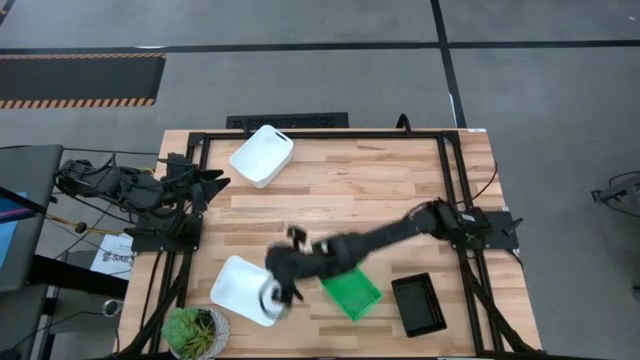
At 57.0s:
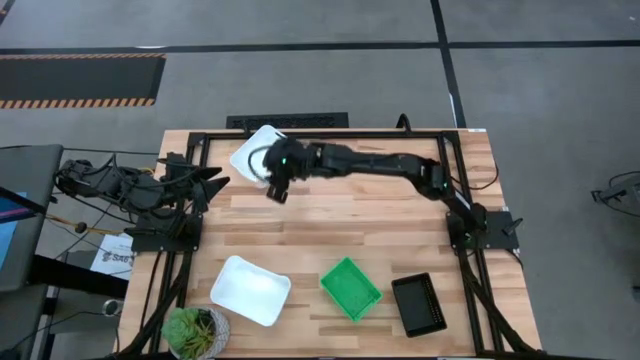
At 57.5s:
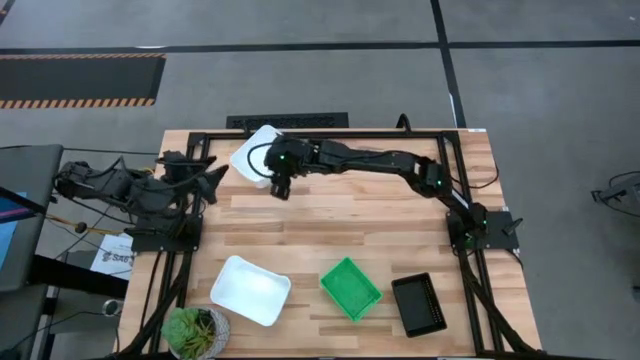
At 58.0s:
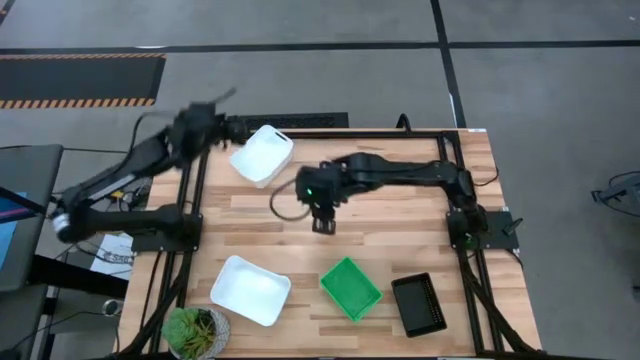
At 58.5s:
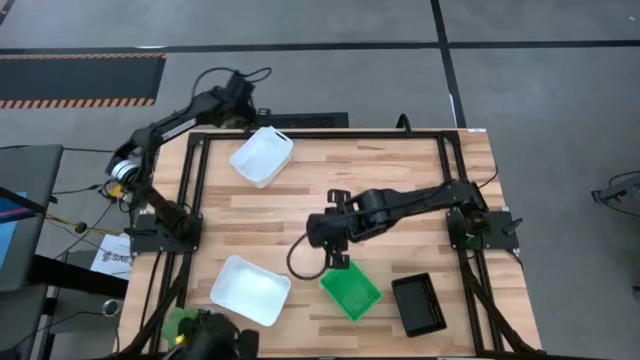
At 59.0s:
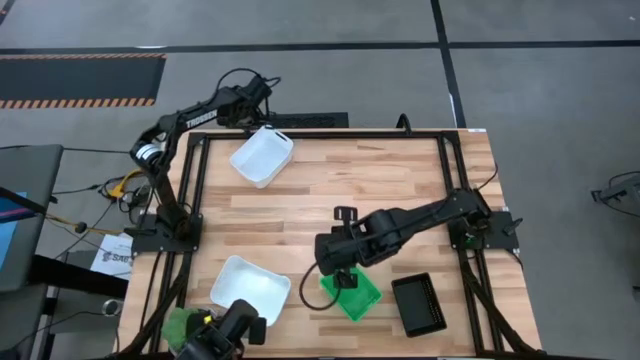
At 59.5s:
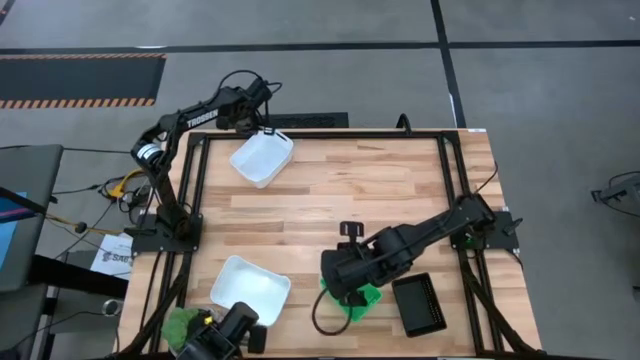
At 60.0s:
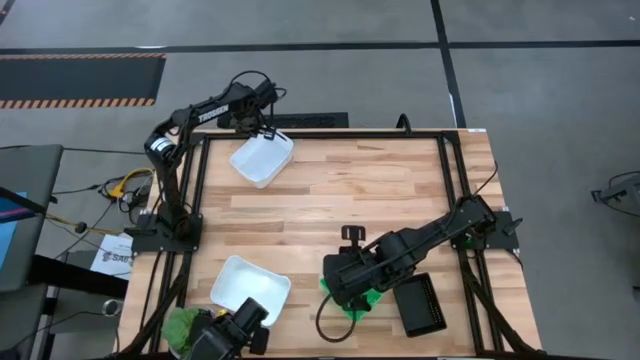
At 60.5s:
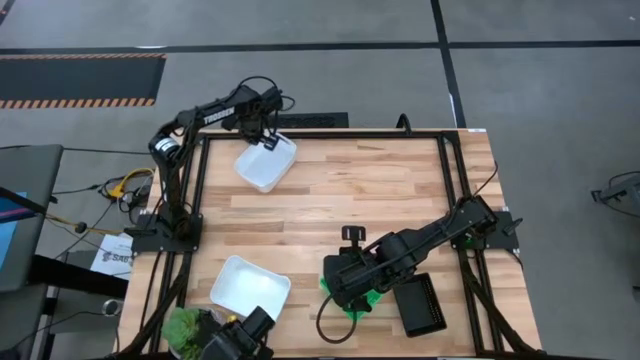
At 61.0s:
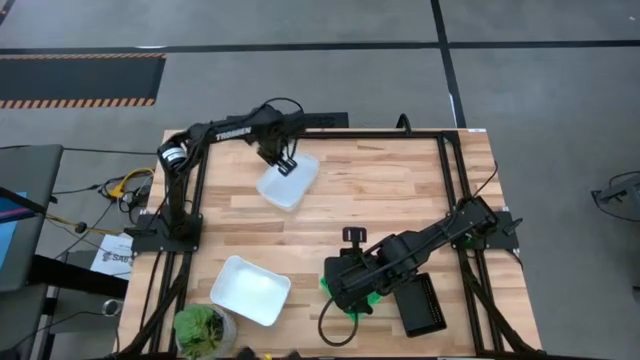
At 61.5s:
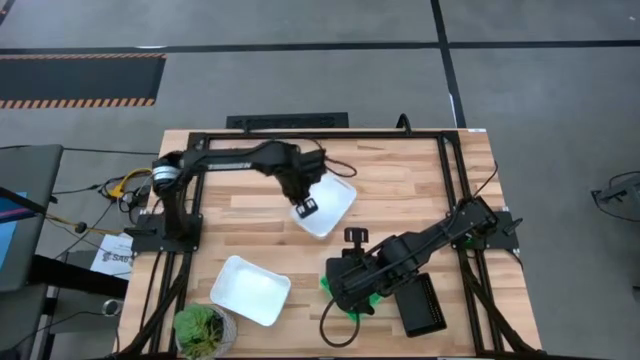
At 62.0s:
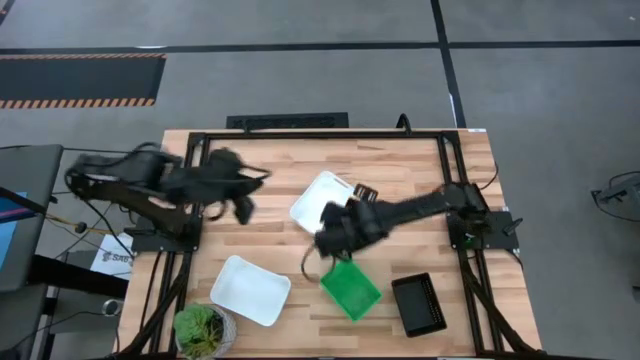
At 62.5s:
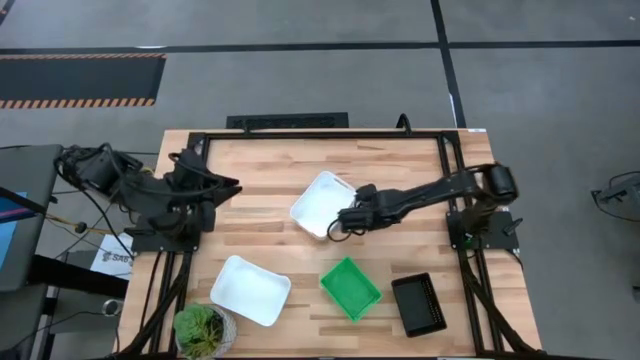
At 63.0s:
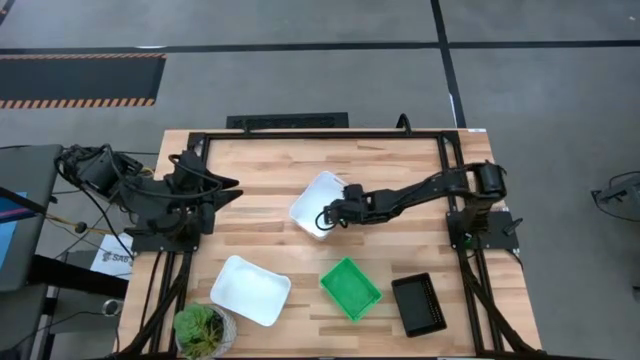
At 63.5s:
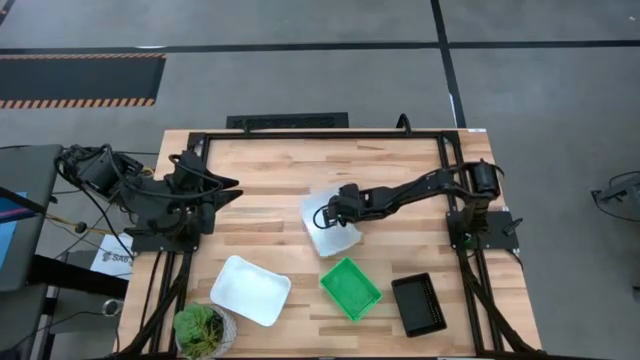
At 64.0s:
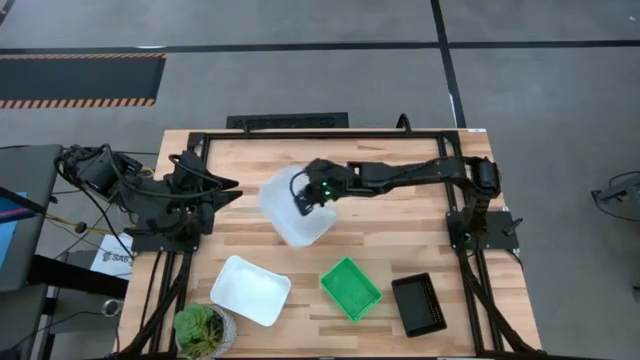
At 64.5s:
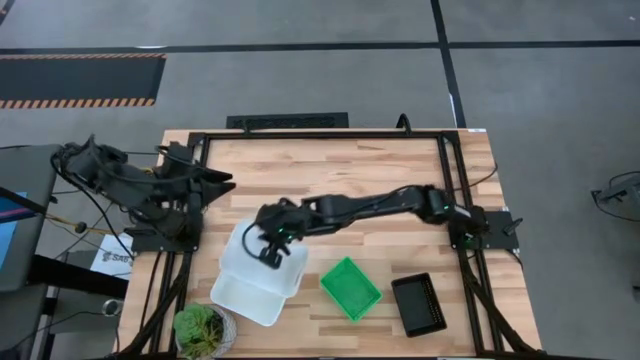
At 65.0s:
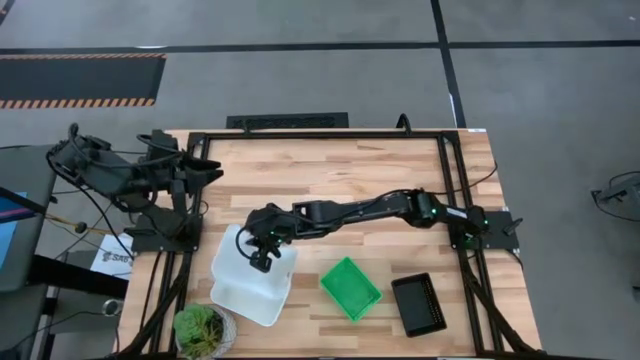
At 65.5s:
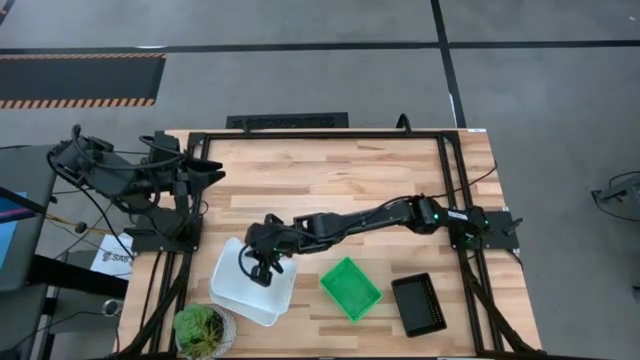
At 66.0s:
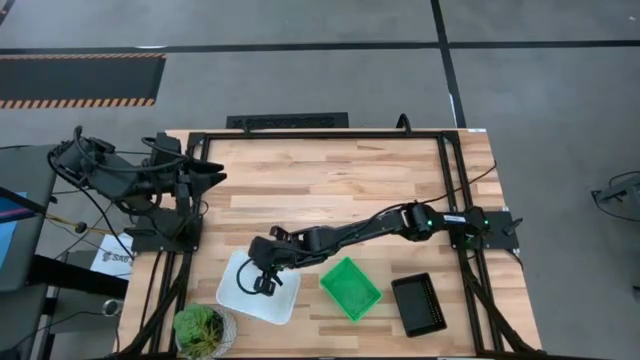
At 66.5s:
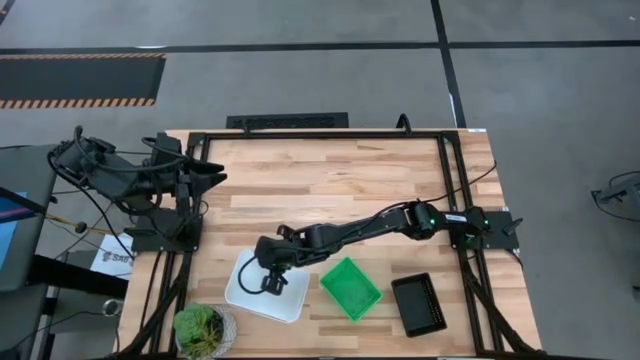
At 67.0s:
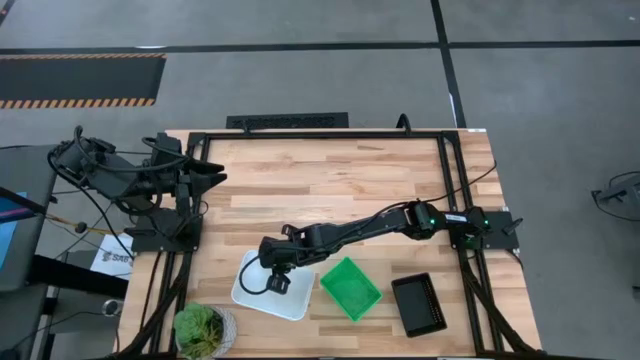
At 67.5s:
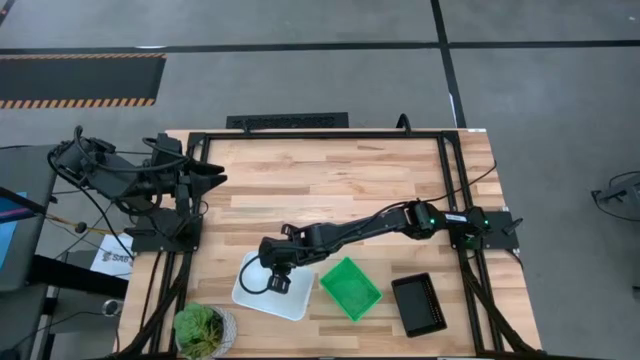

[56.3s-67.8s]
Stack the top white bin on the bottom white bin

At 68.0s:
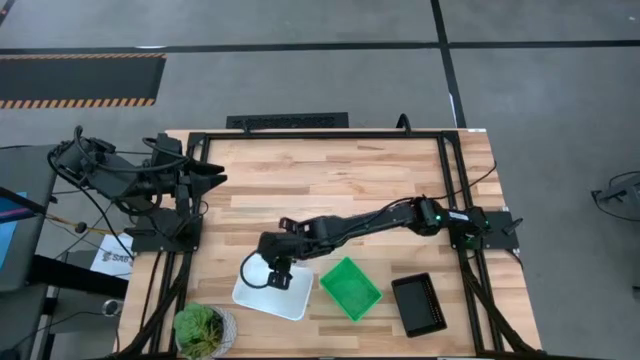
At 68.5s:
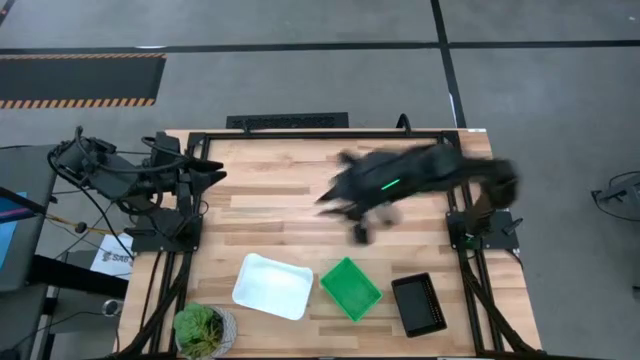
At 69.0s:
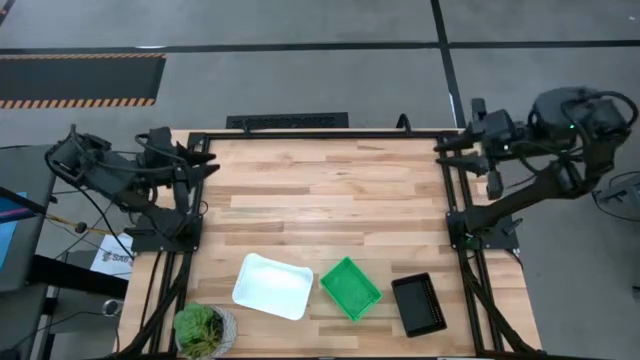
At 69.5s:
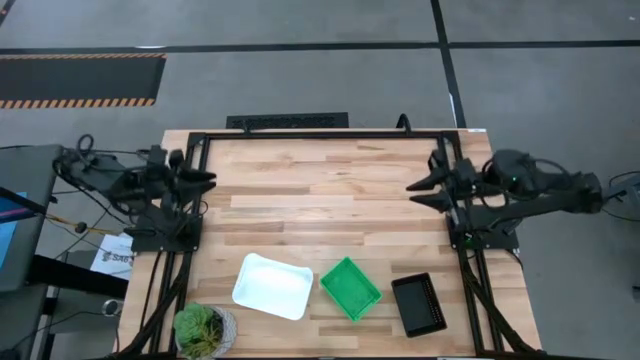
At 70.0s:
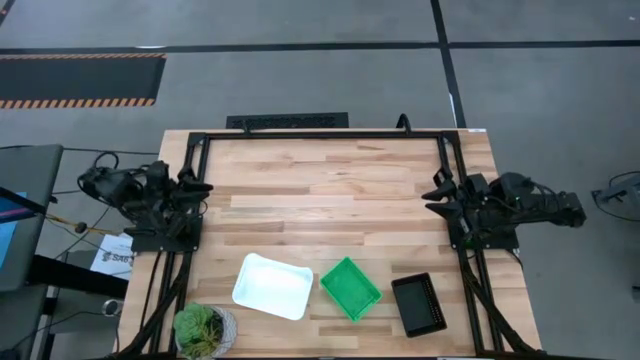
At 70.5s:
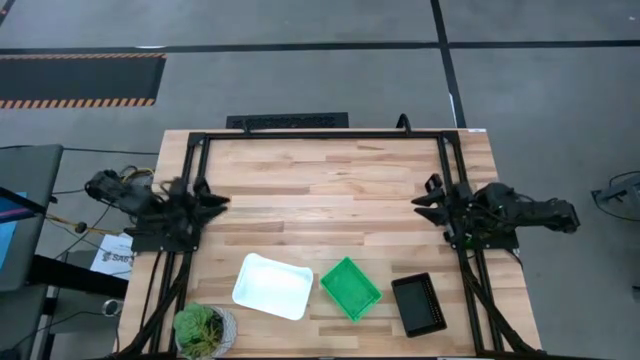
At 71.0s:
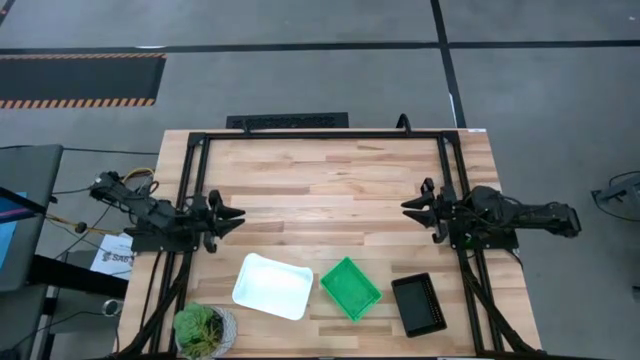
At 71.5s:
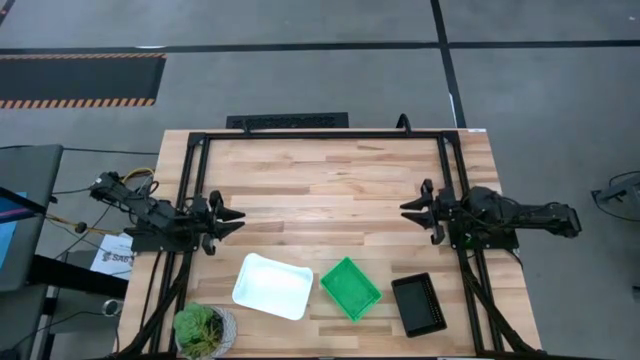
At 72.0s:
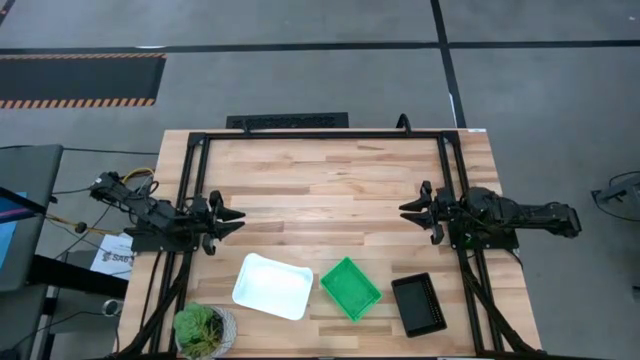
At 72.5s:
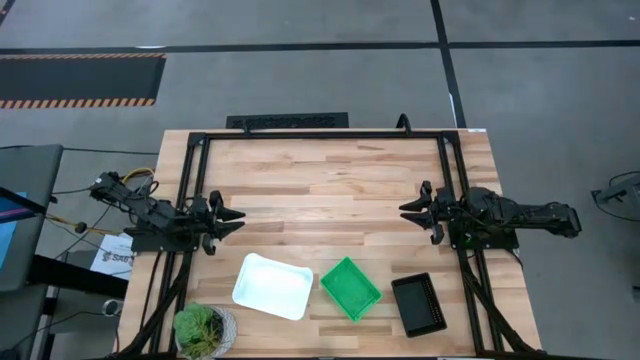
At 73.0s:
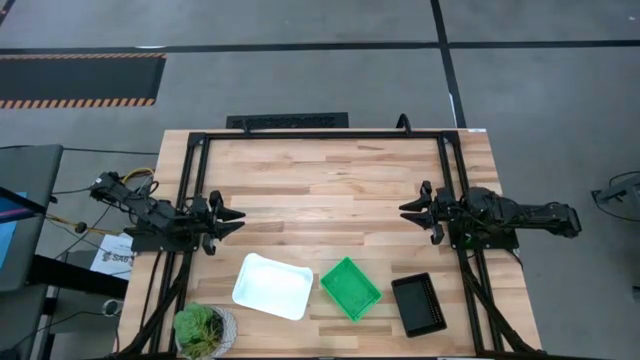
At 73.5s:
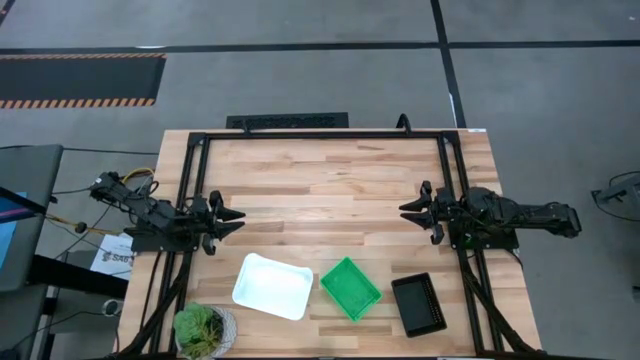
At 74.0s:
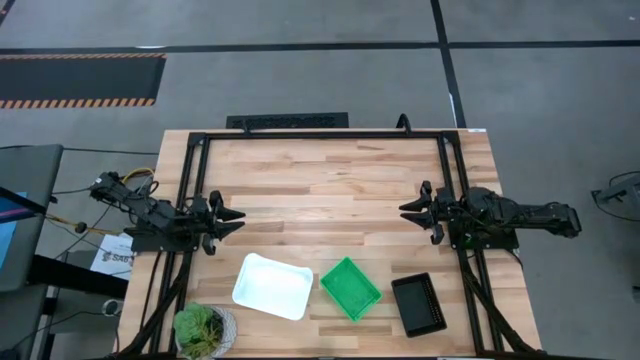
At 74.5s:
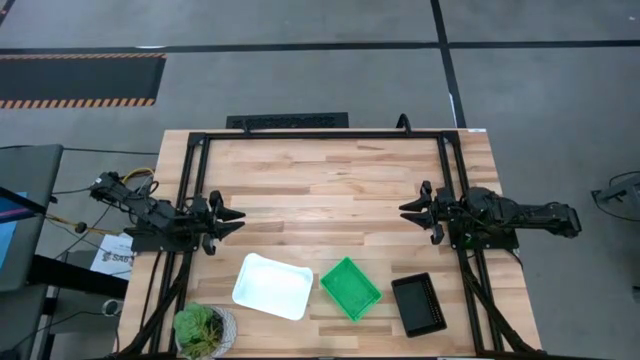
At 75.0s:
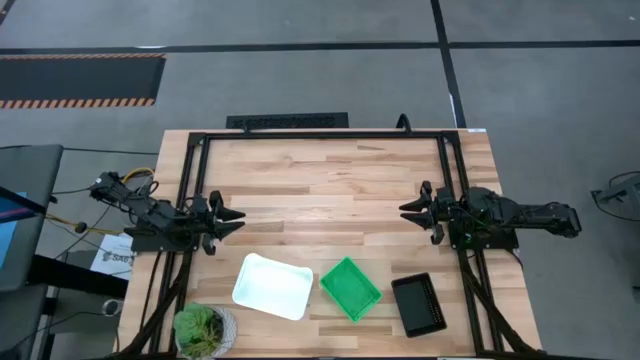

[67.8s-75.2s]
Return to Home Position
